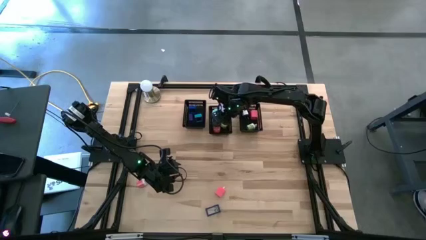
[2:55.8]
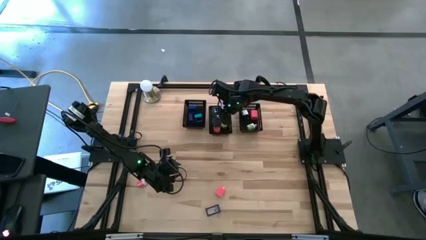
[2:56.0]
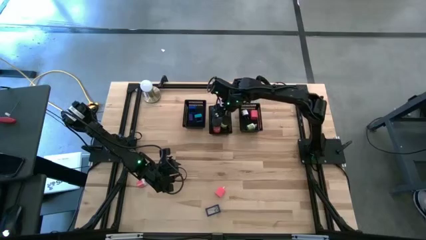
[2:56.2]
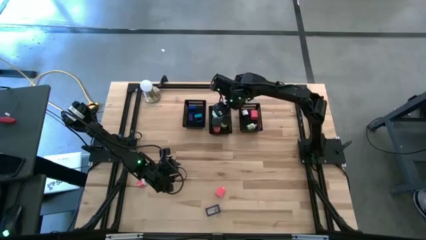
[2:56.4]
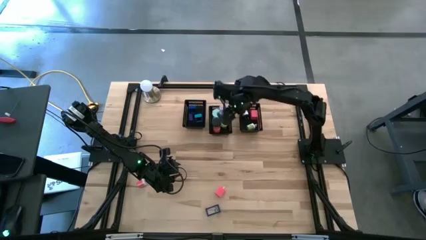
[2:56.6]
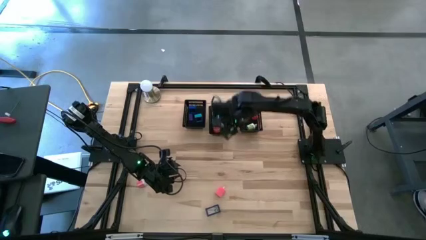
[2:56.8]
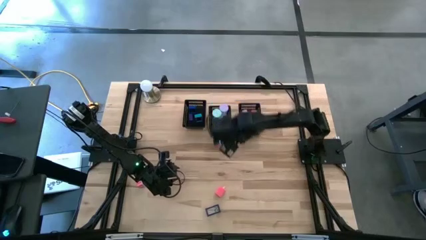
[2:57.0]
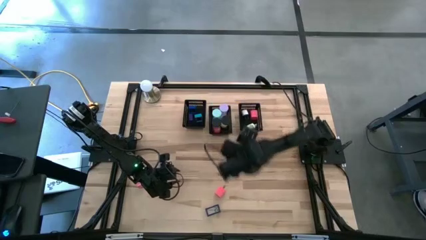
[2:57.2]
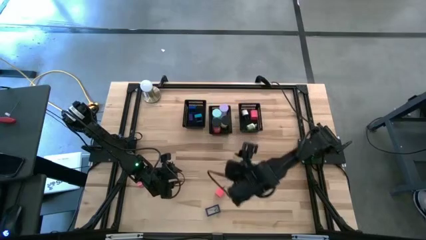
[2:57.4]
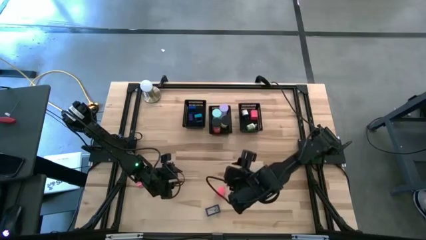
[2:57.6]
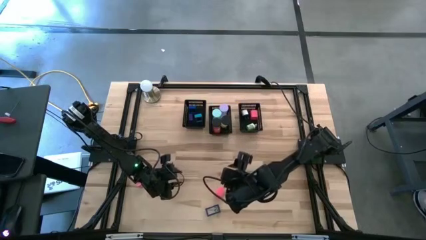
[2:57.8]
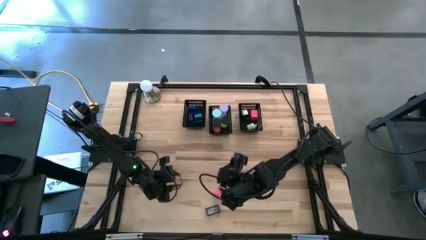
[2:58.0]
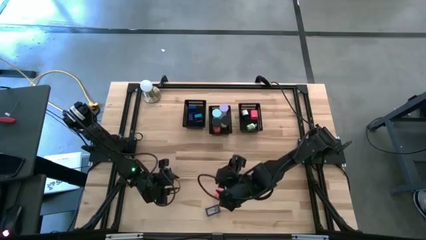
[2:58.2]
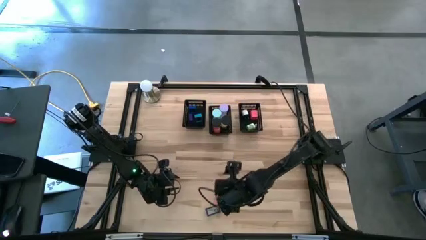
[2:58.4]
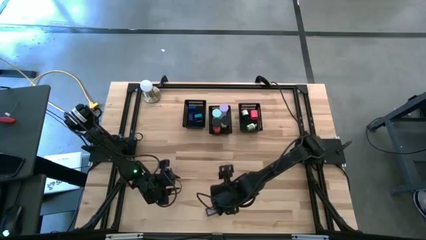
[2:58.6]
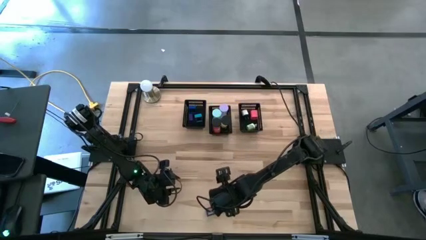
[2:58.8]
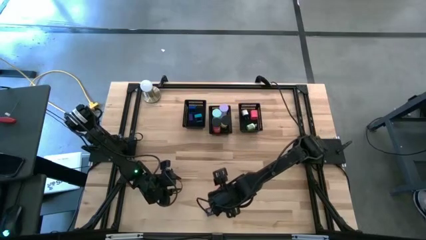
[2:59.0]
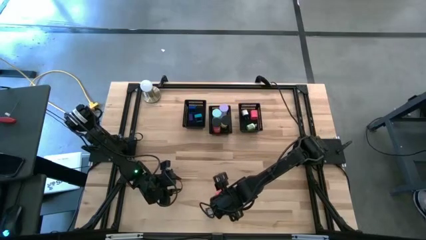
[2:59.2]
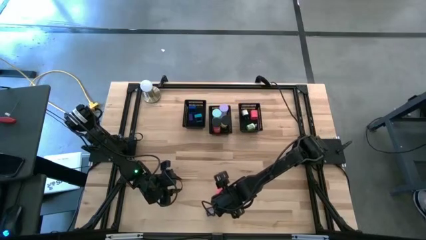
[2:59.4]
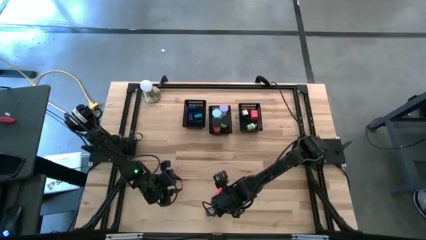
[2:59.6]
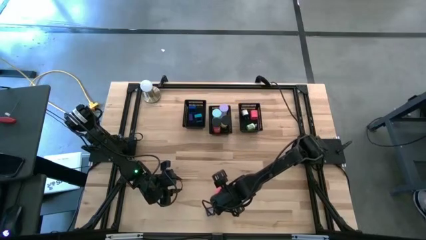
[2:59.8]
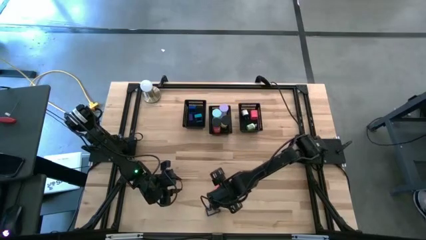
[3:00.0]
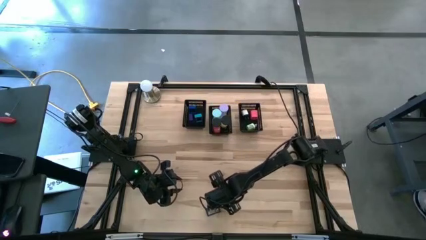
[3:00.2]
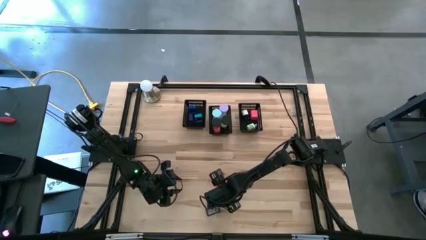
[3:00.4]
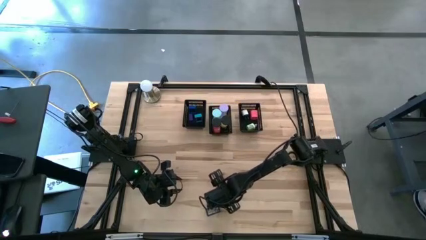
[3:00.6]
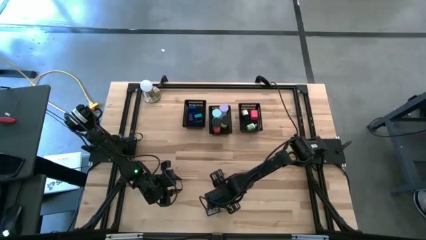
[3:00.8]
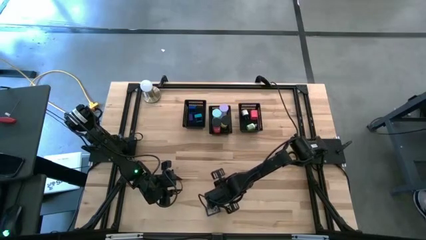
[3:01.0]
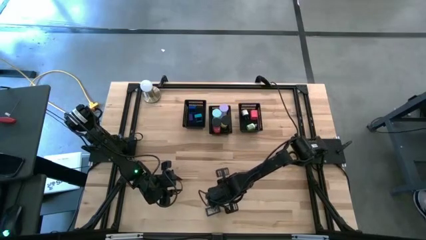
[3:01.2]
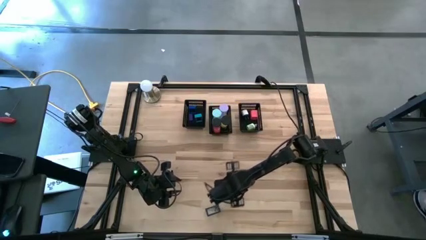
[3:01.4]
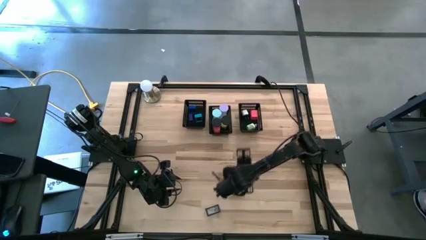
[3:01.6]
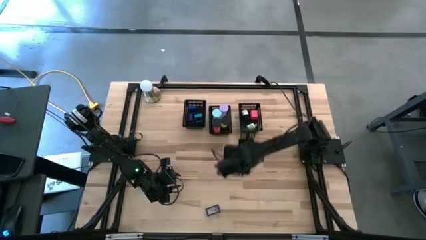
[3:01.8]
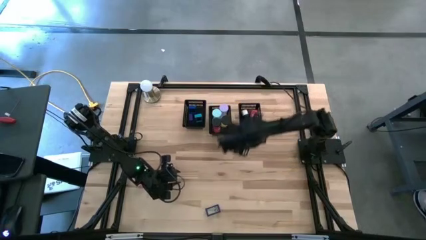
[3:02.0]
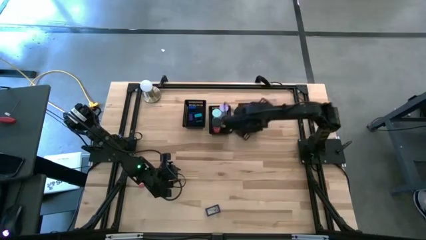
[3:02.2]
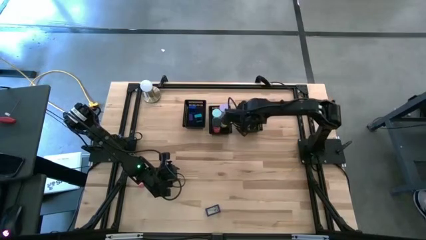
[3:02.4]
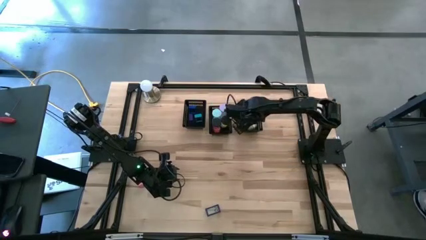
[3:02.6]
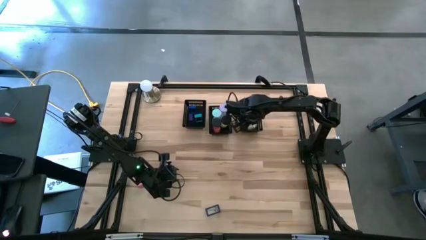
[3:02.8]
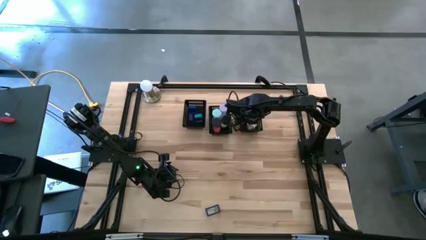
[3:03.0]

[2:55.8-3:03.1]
Task: Pick & Place Office items
Put the pink charger adapter into the right black bin

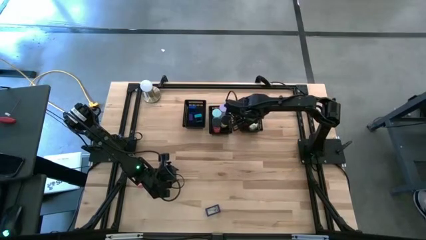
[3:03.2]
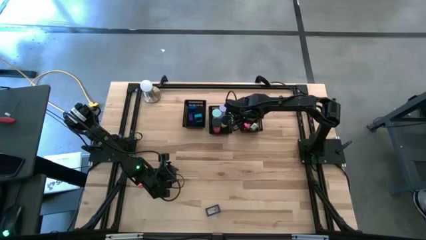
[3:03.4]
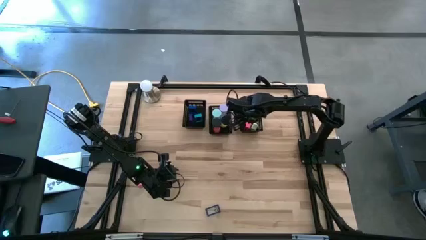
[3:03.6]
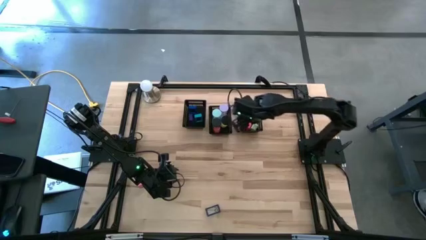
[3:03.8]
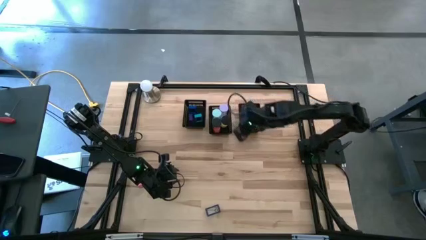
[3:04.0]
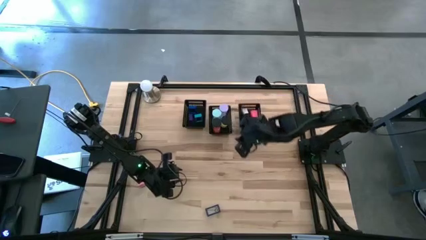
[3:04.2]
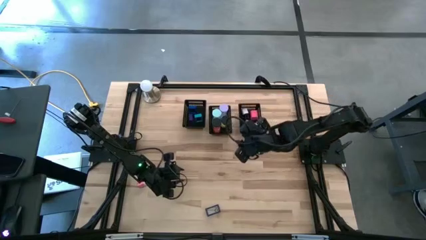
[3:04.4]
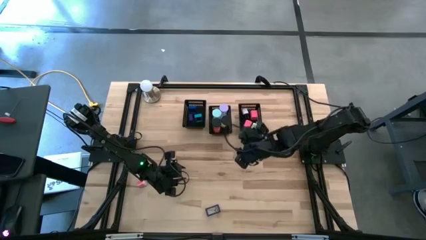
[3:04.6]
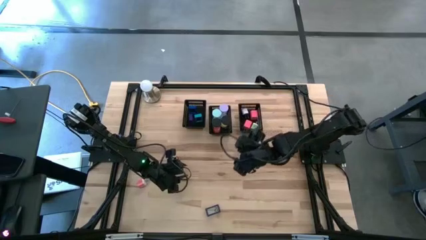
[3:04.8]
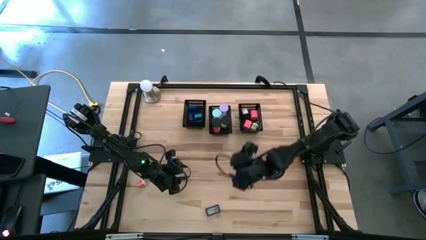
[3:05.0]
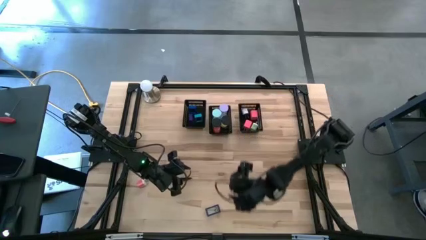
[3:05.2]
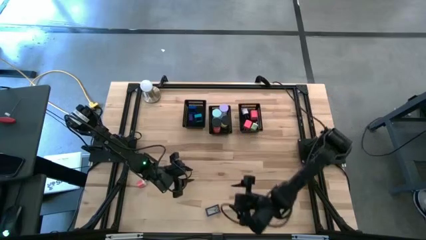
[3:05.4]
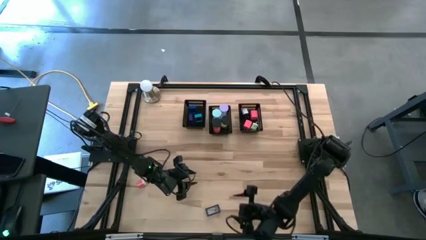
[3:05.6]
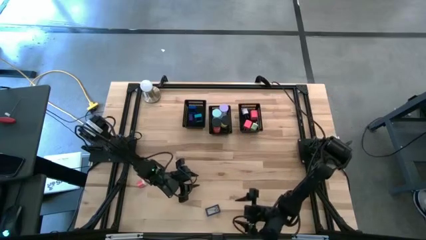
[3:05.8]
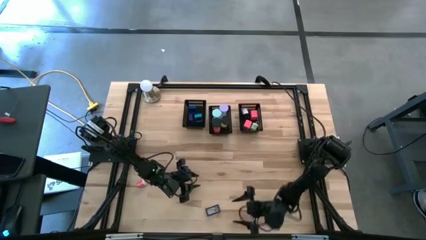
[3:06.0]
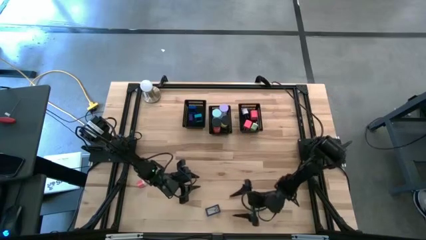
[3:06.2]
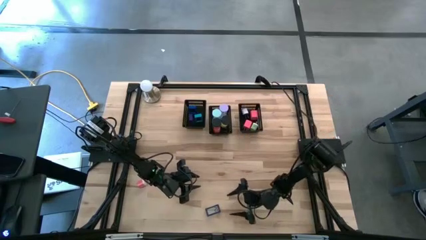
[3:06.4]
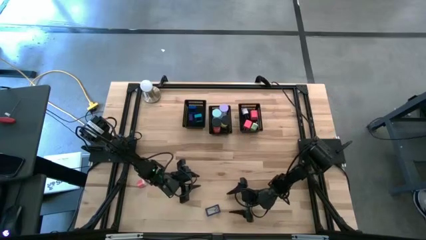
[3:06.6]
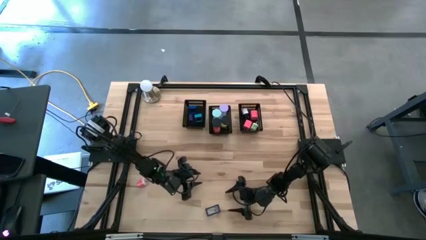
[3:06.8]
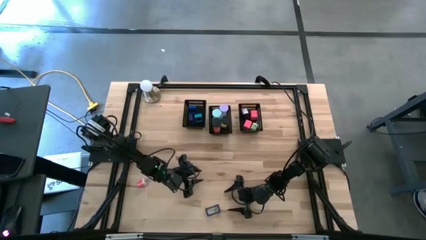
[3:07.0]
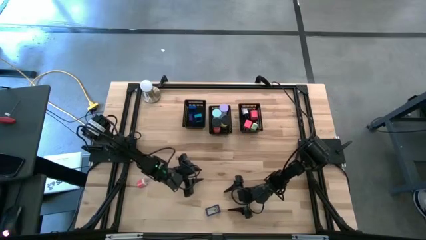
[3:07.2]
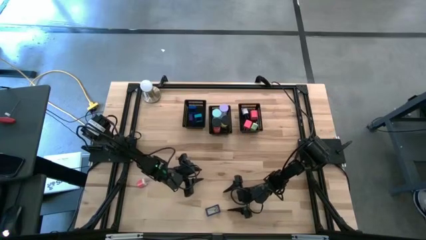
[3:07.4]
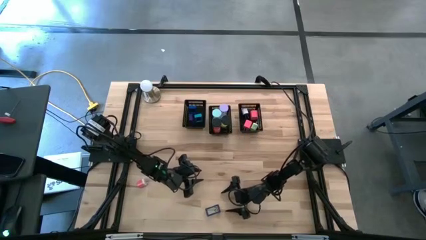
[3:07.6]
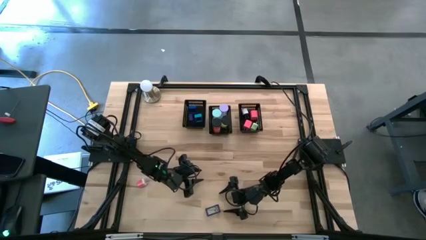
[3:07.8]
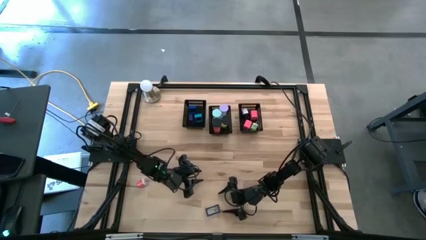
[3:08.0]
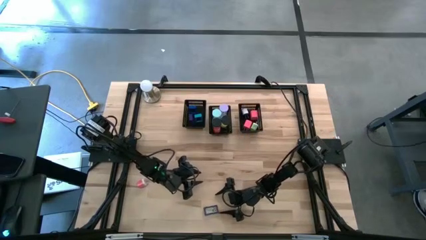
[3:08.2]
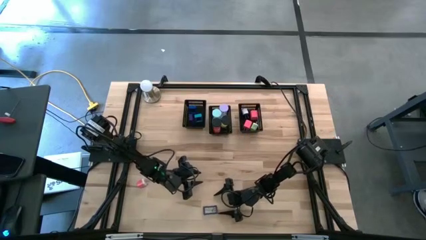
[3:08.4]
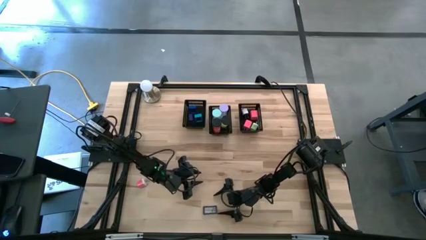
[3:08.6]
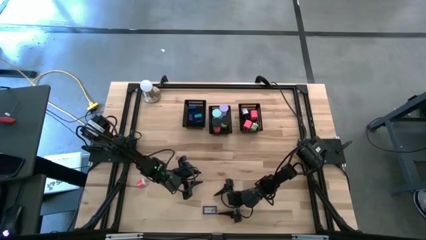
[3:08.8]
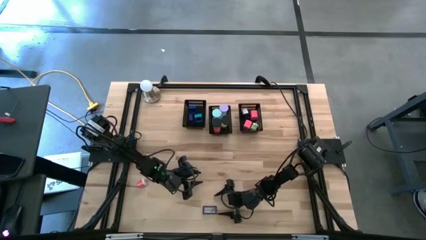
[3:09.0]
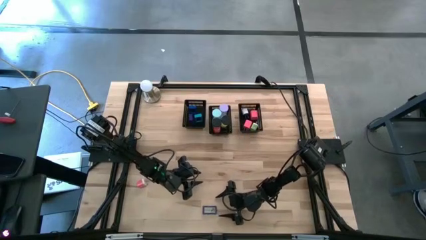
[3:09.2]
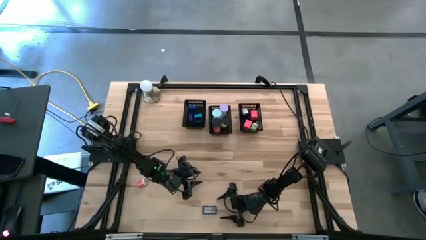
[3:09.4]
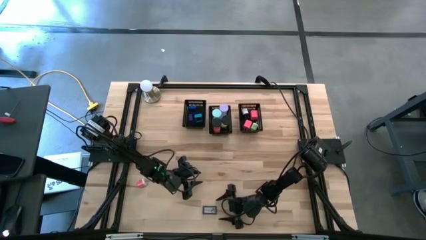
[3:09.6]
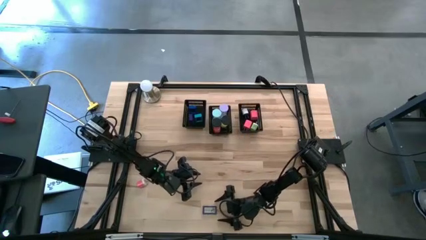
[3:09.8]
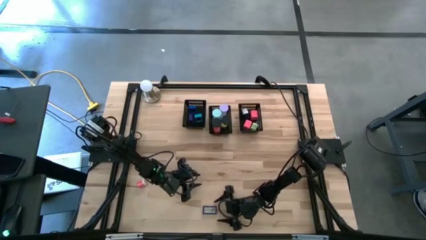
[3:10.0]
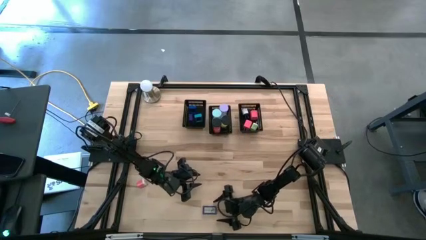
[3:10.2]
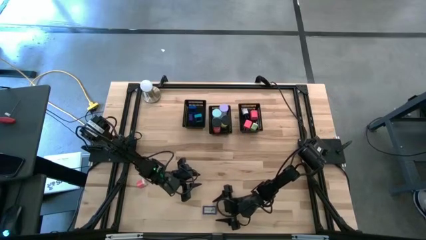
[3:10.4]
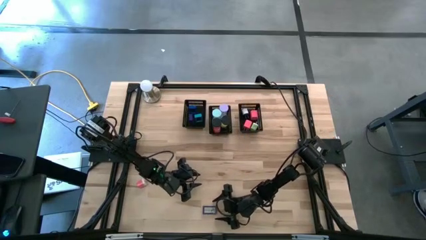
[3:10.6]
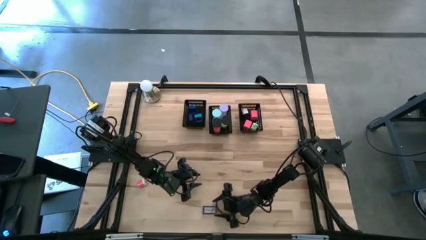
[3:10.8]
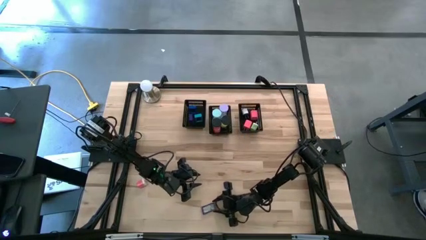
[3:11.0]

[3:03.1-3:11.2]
Put the blue digital clock into the left black bin

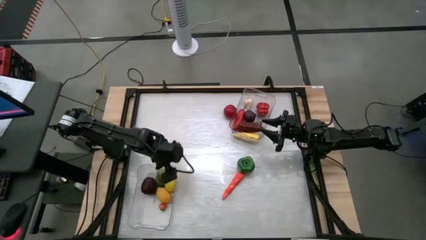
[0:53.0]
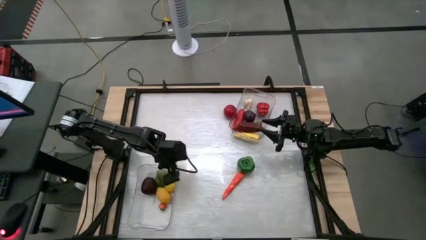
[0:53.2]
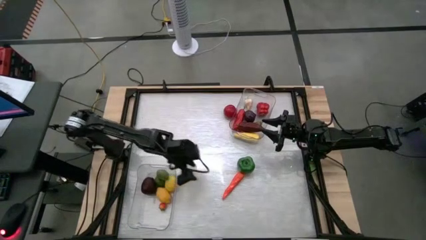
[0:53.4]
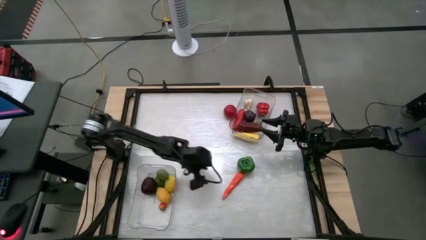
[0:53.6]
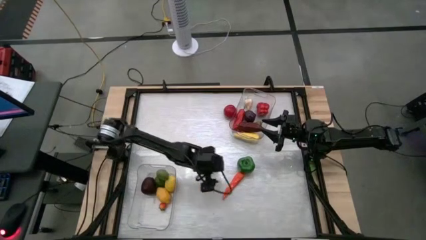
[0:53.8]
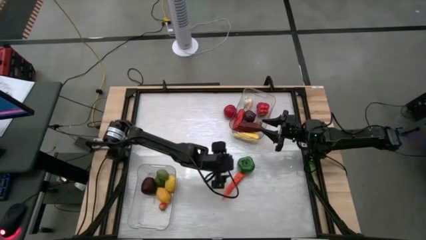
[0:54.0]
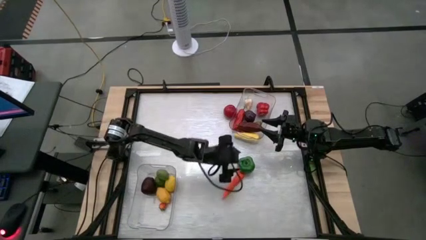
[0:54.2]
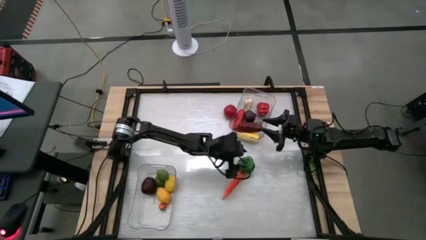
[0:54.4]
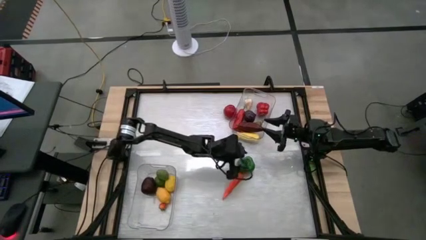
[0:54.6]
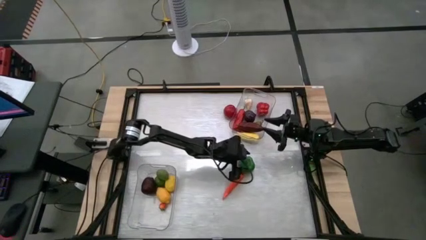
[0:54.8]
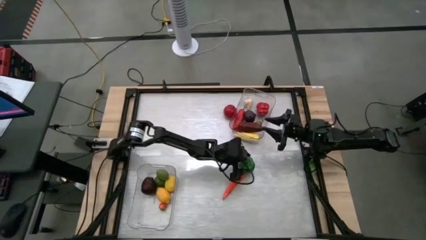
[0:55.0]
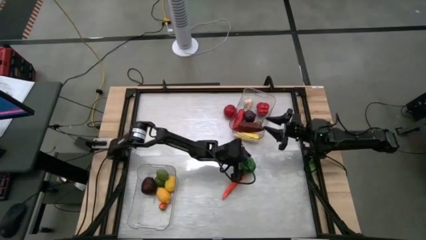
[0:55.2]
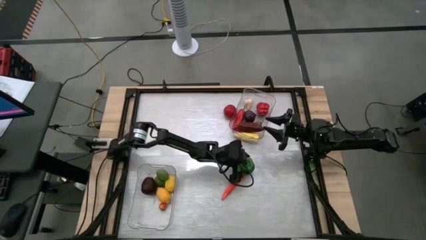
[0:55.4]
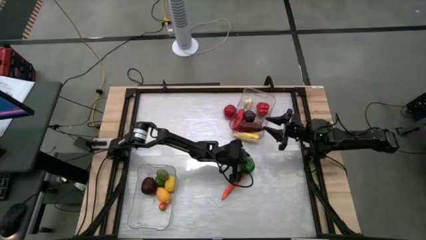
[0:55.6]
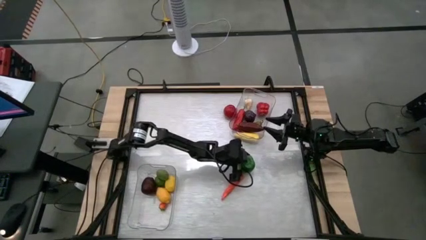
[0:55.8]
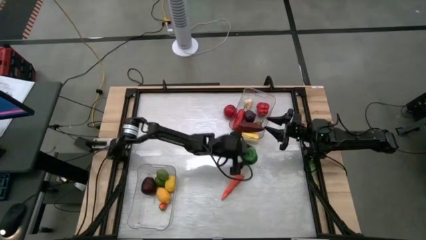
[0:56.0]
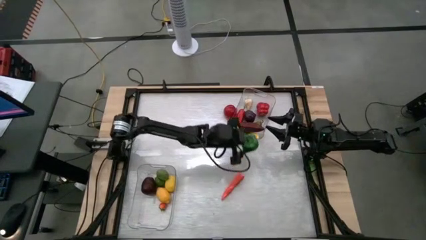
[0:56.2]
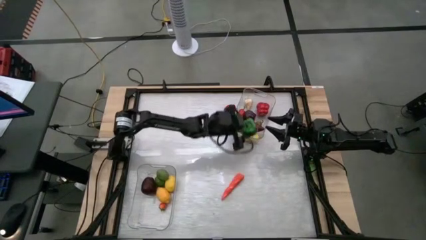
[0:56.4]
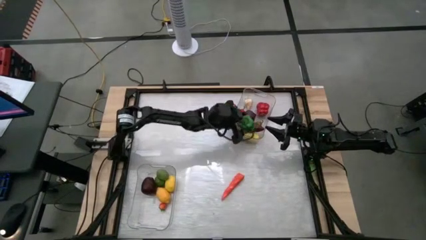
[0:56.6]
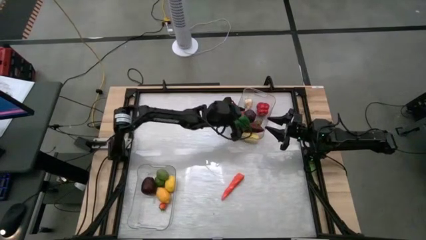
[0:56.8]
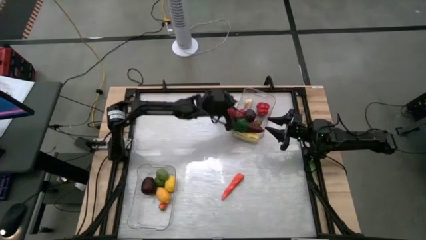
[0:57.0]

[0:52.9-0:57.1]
Task: Sort produce into baskets
Put the green bell pepper into the top transparent bin
